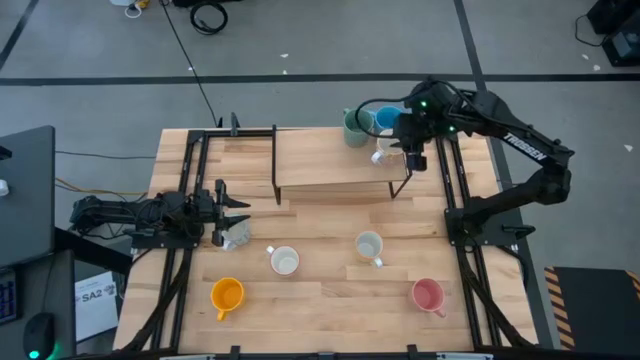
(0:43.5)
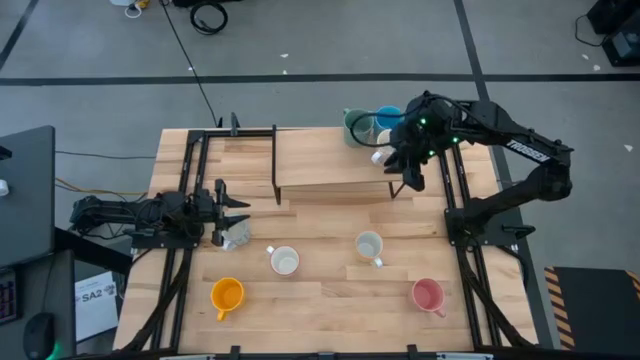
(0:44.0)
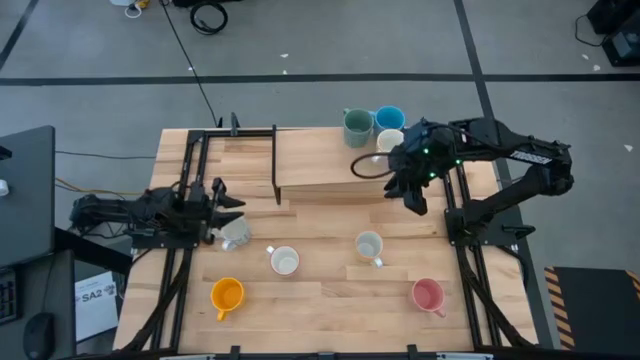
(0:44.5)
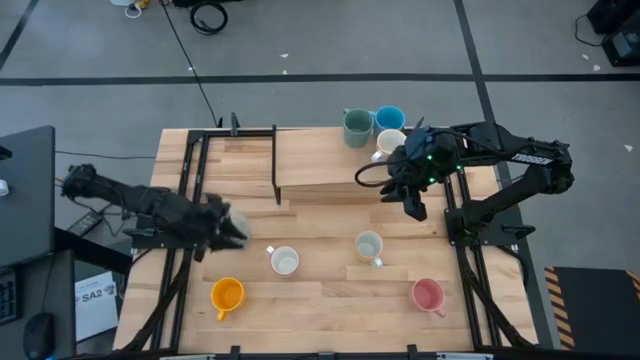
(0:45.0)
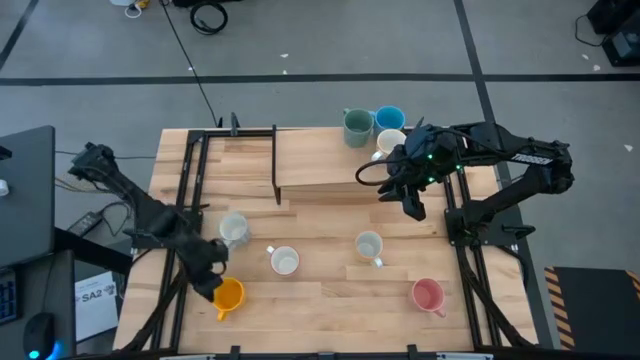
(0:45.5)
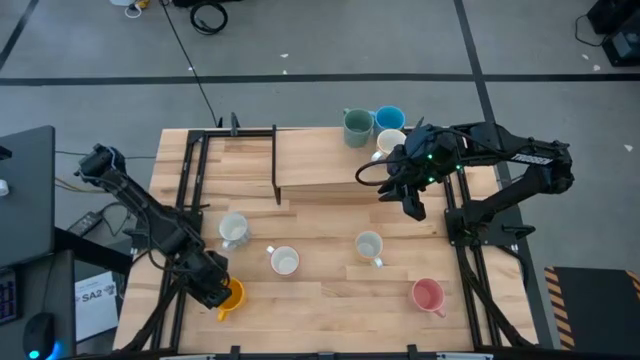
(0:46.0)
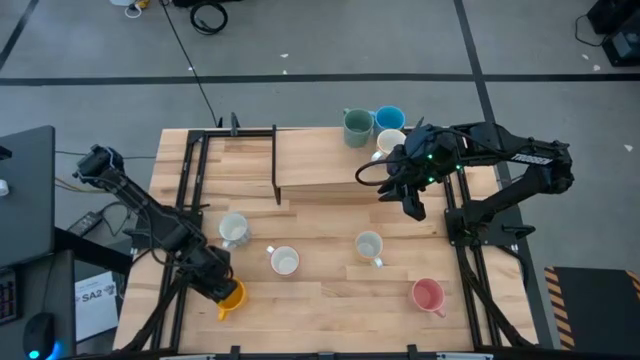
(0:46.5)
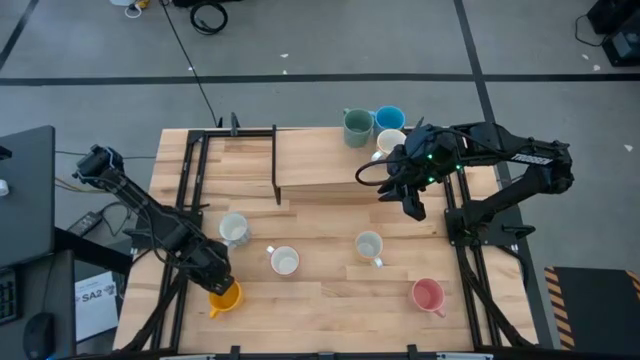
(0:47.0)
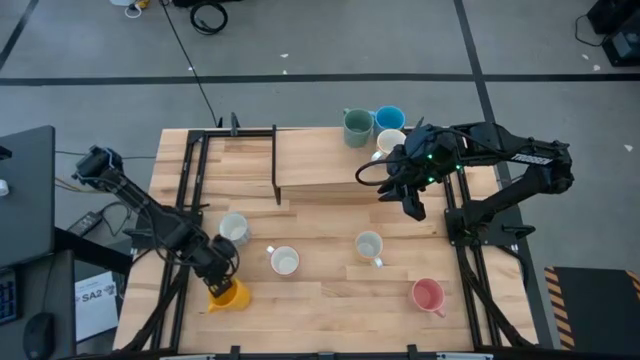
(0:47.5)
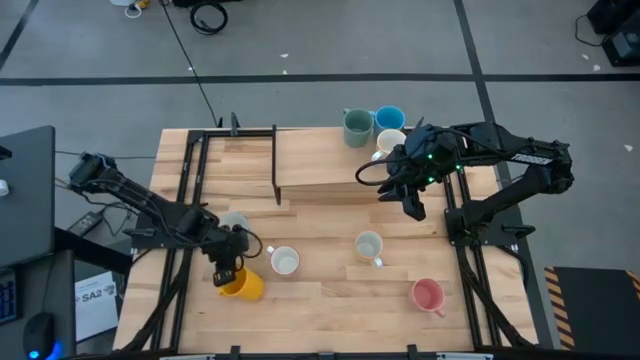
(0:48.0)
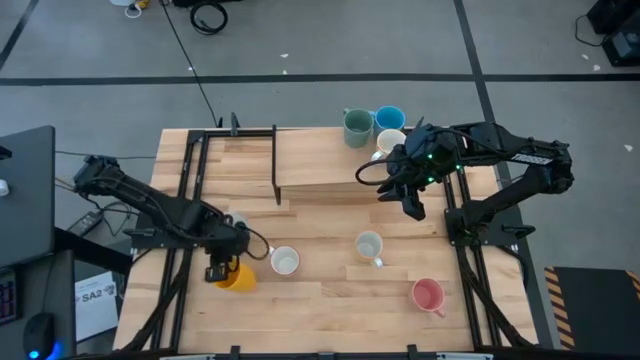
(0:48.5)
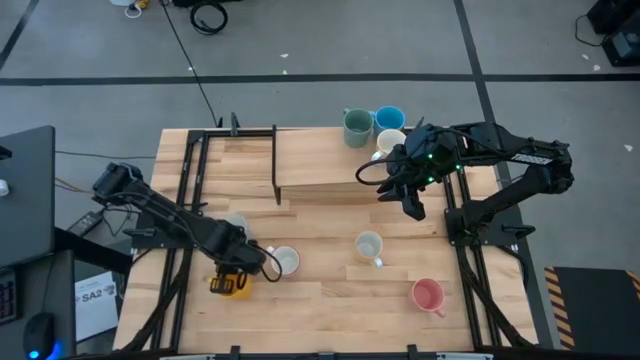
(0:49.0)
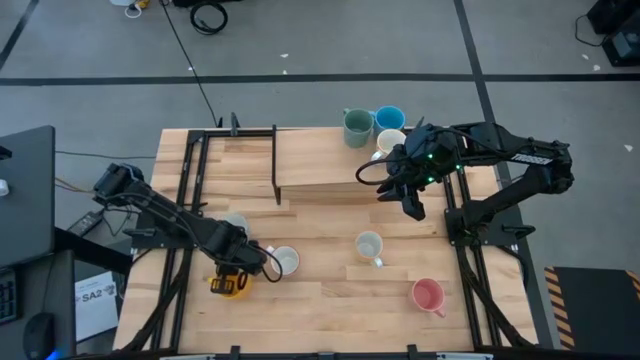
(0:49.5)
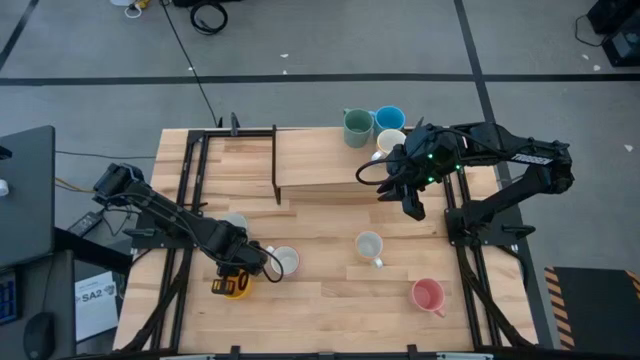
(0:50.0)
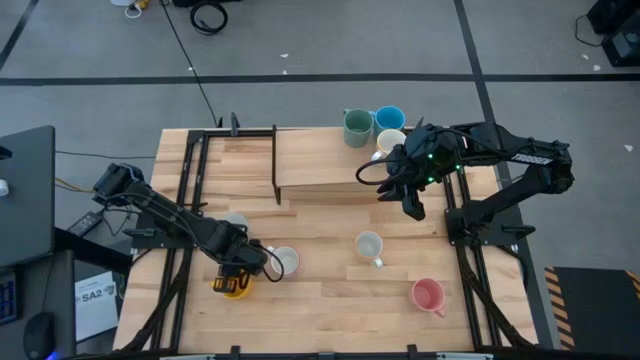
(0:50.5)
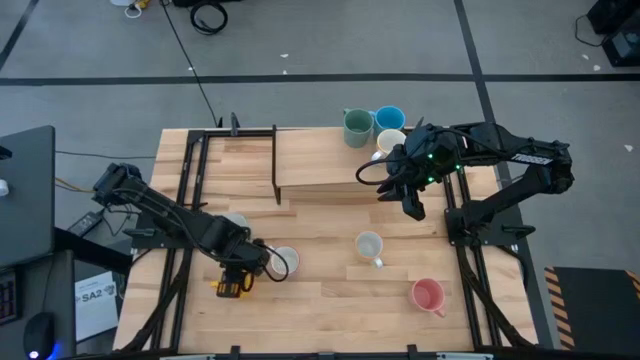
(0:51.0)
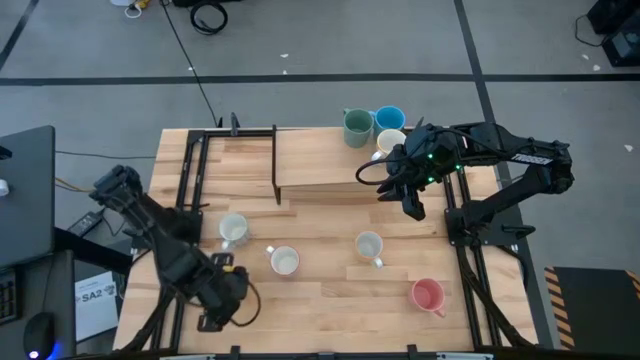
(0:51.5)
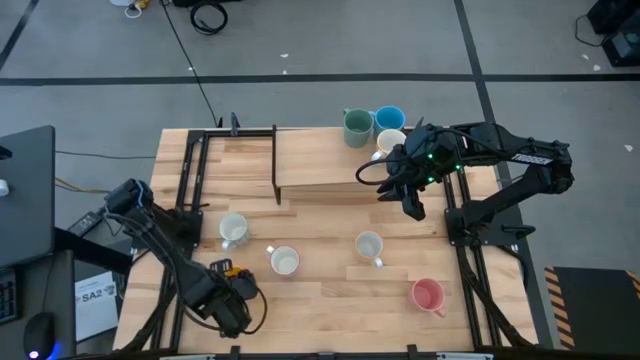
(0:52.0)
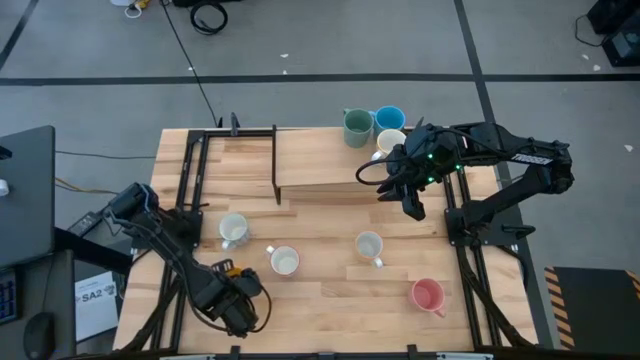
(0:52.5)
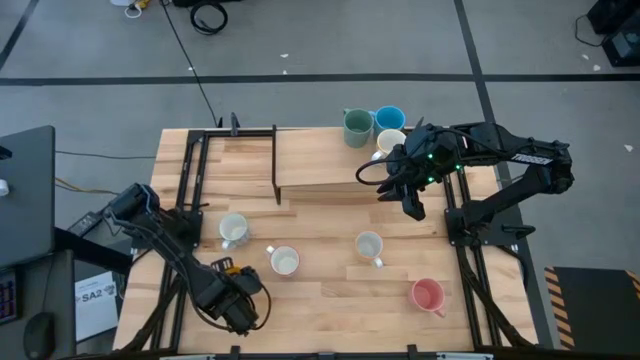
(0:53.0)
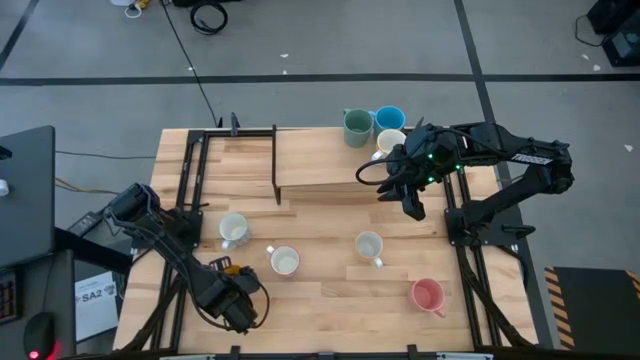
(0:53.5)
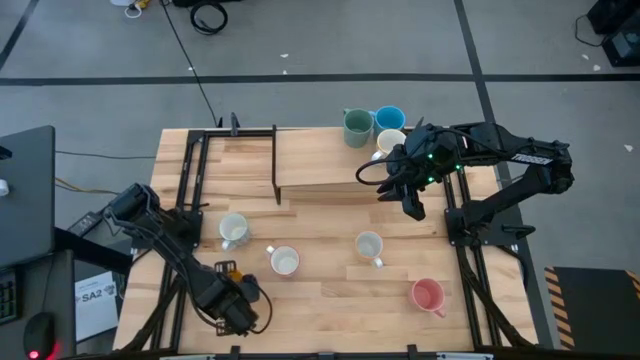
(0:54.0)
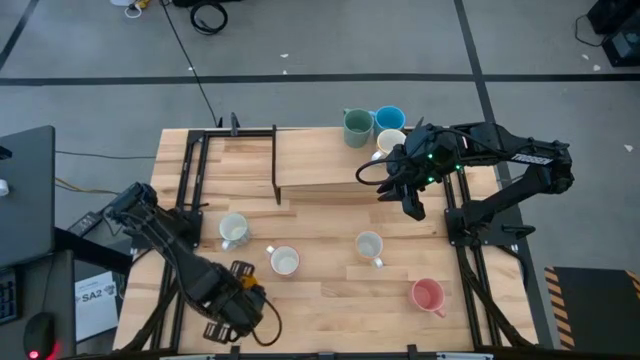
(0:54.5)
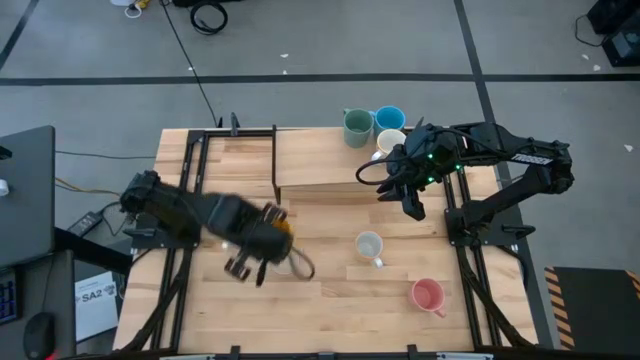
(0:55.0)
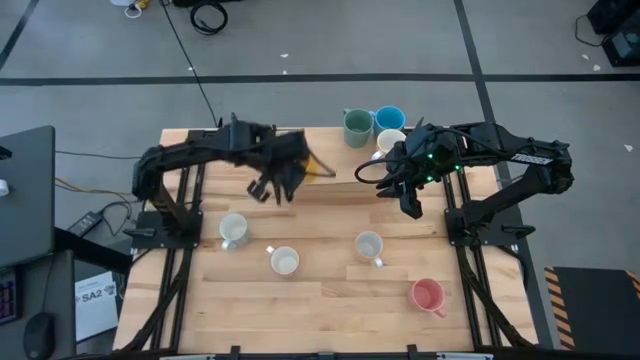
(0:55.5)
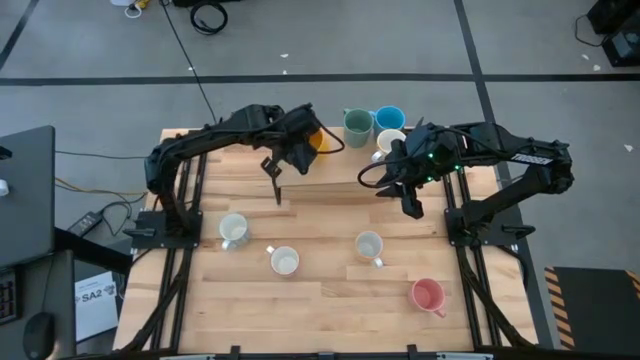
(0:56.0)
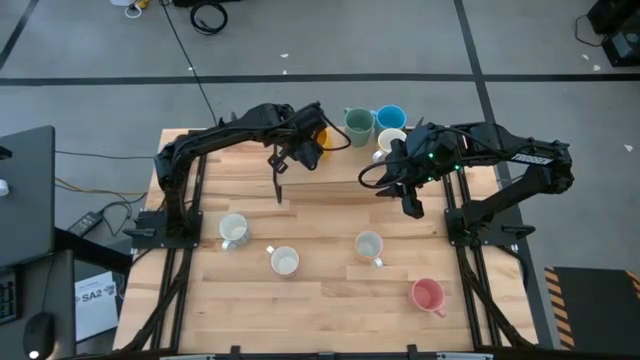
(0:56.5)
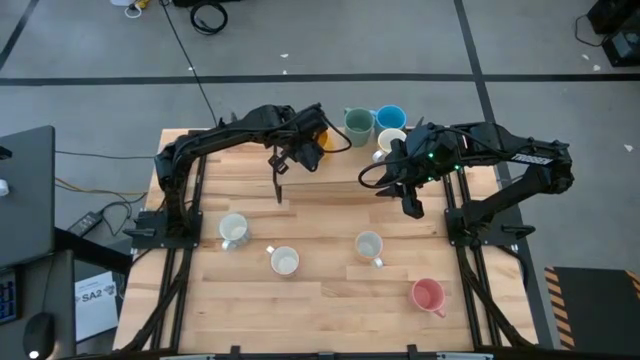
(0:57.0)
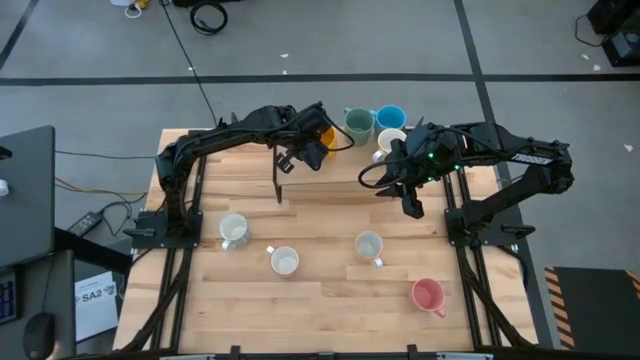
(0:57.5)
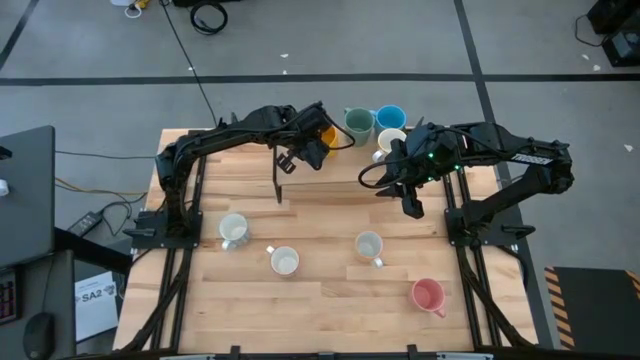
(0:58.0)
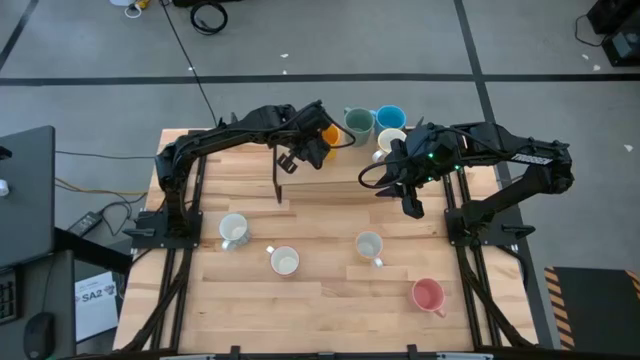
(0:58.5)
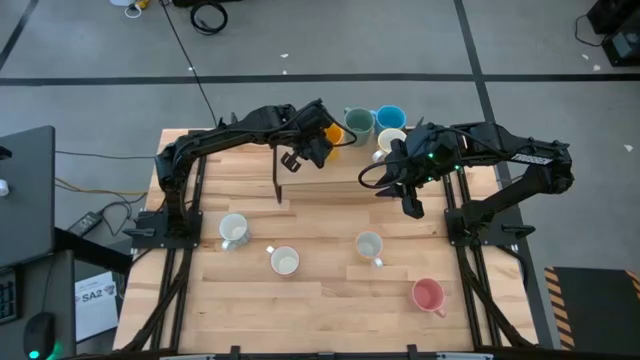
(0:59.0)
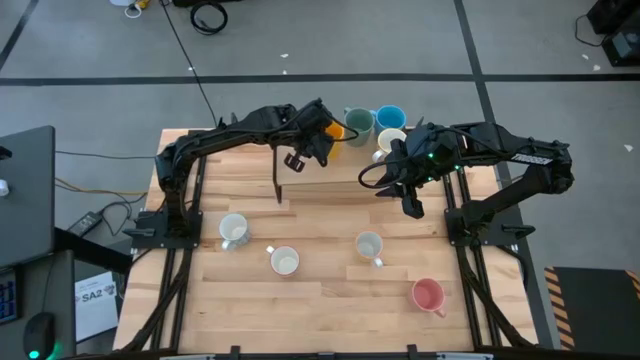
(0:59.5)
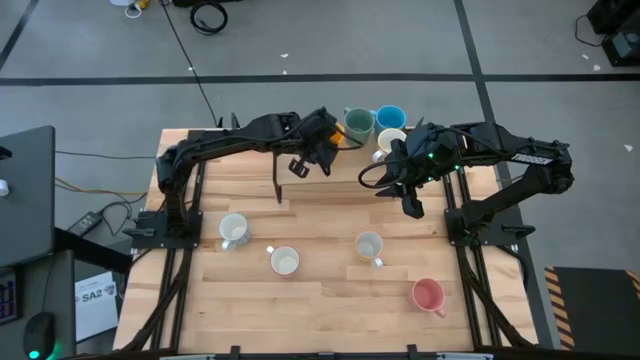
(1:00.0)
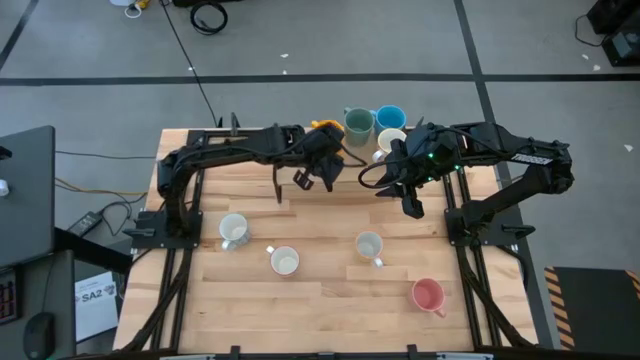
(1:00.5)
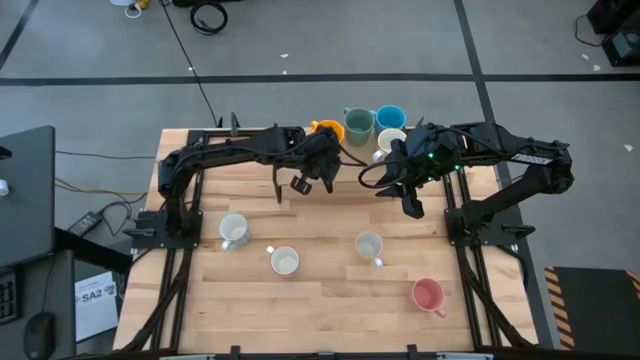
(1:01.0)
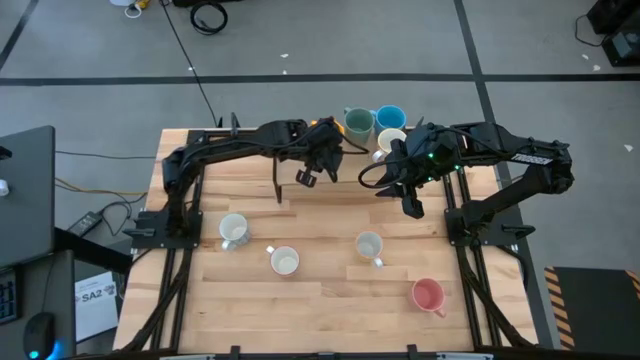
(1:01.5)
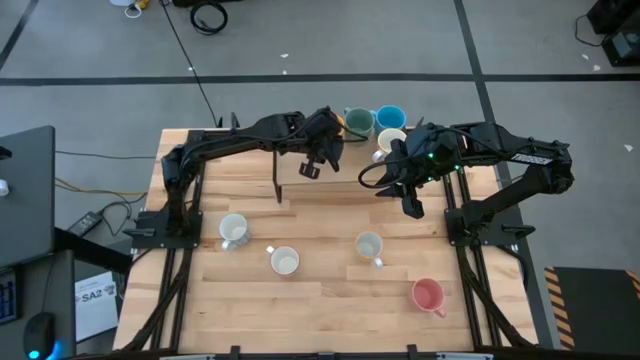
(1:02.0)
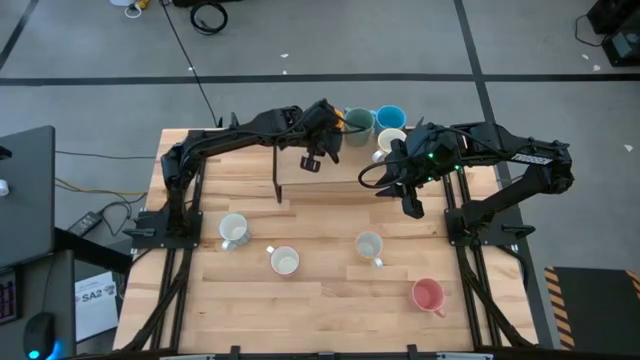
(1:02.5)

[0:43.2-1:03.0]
Task: Place coffee mugs
Put the yellow mug on the shelf

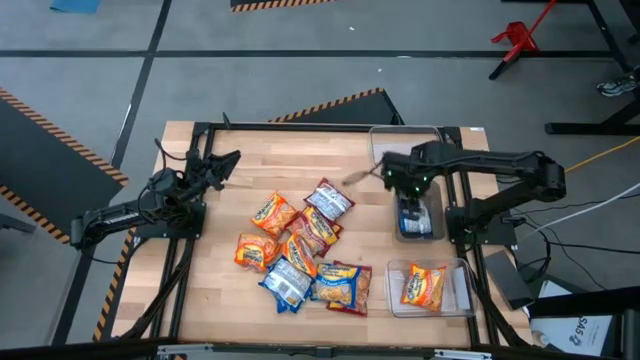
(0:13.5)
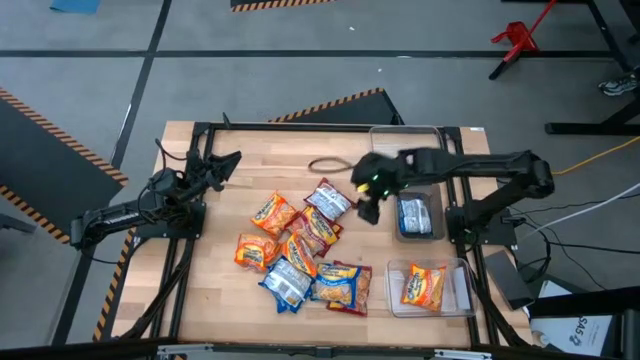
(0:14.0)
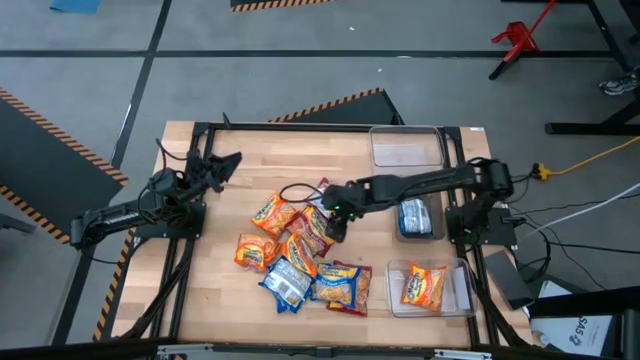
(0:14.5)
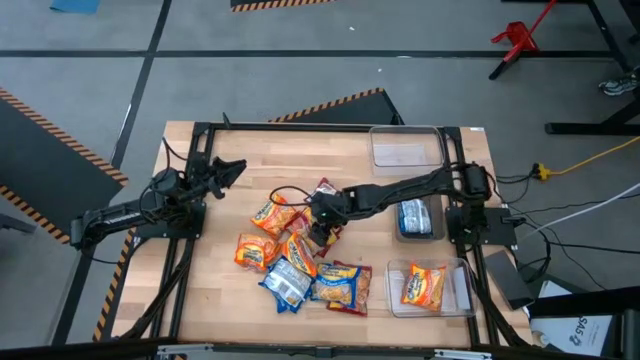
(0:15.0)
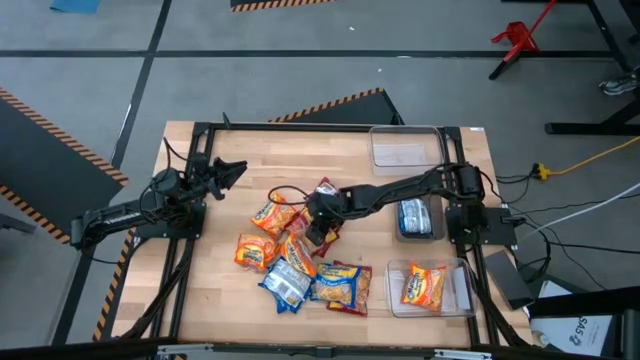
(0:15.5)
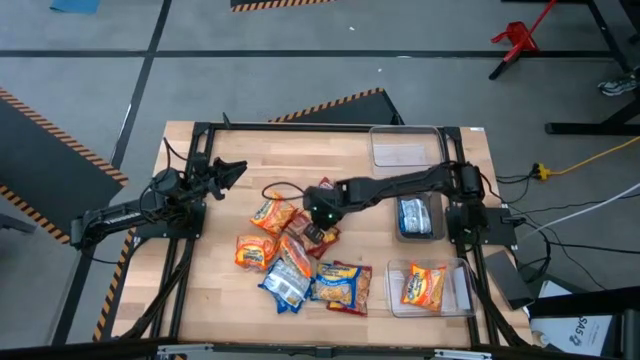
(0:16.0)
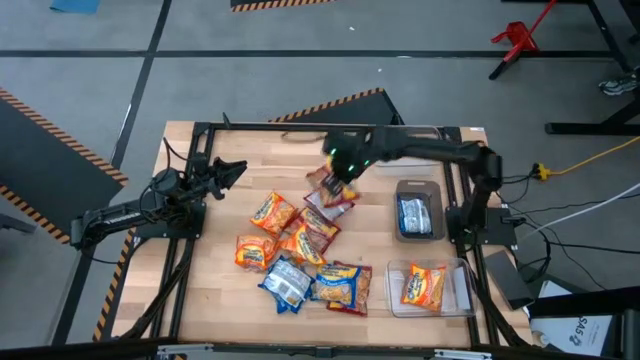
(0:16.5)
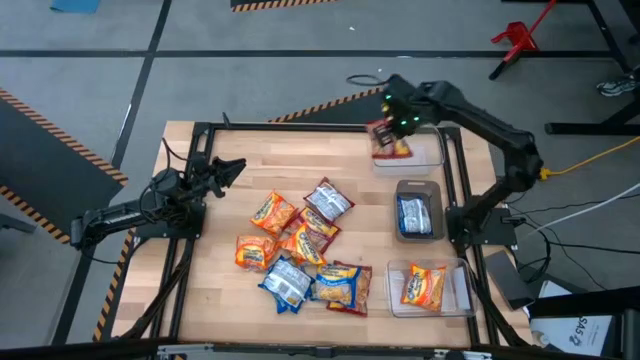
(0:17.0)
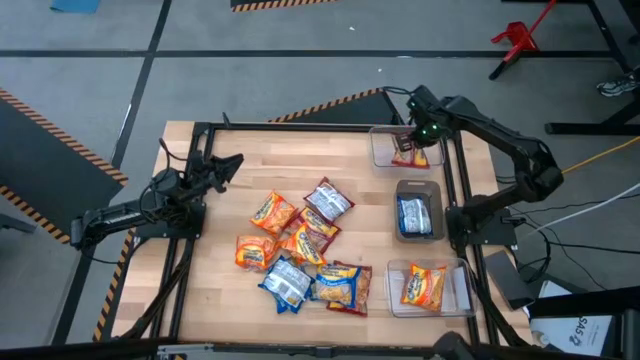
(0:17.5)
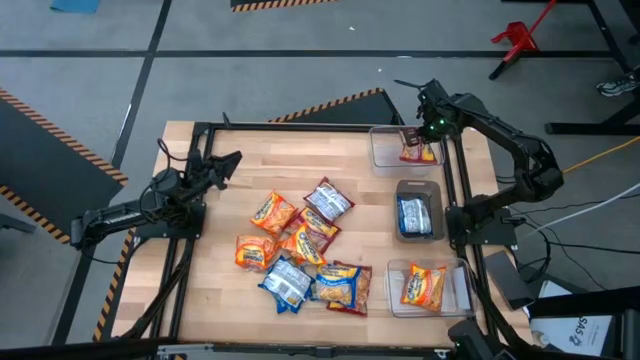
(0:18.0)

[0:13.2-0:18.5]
Task: Sort Maruchan noodles
Put the red noodle pack into the top transparent bin
